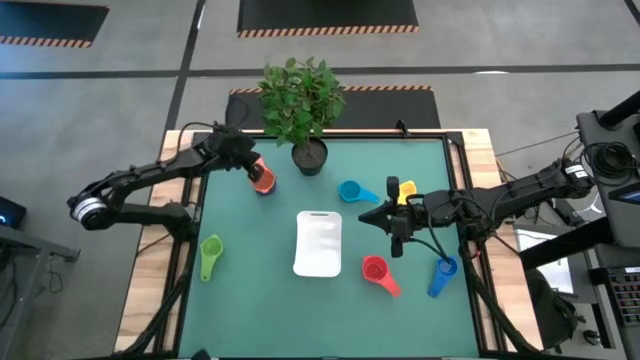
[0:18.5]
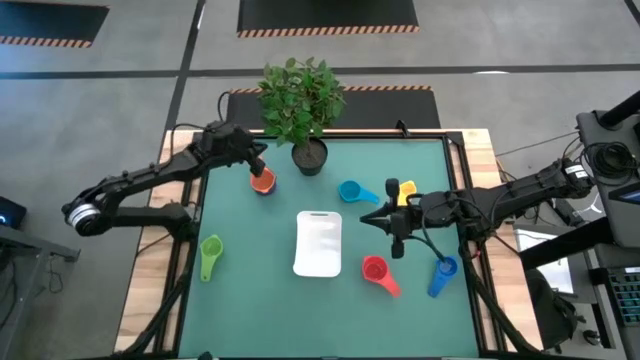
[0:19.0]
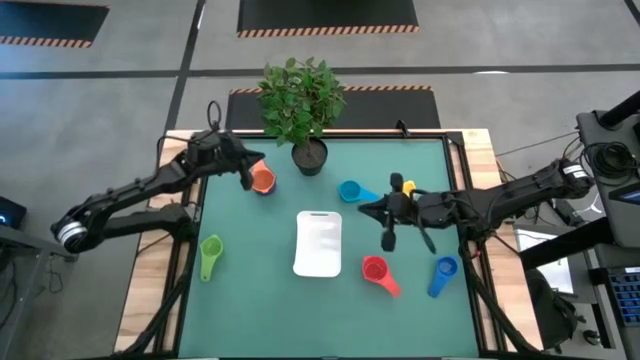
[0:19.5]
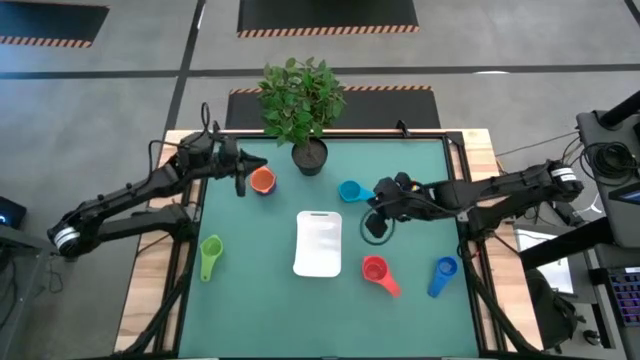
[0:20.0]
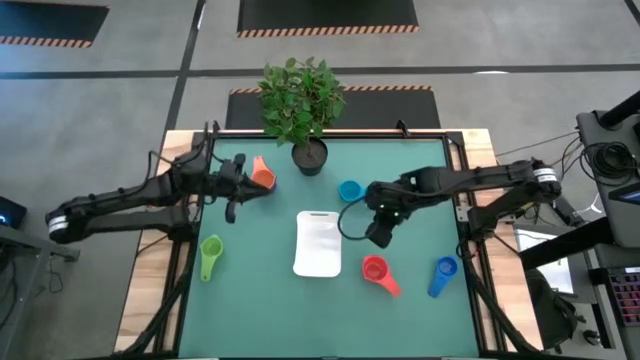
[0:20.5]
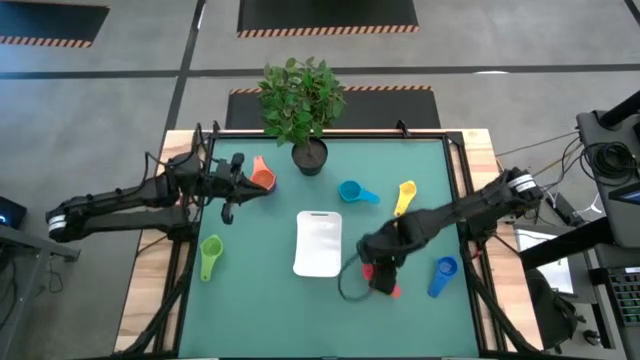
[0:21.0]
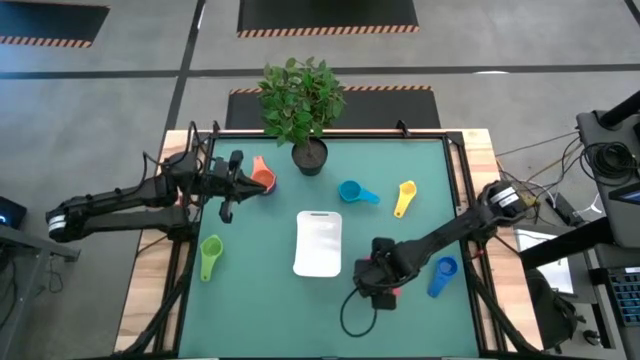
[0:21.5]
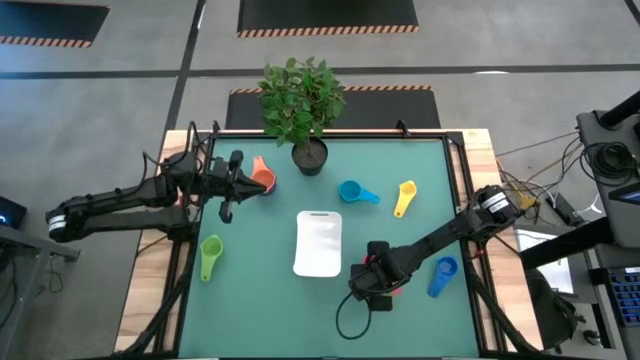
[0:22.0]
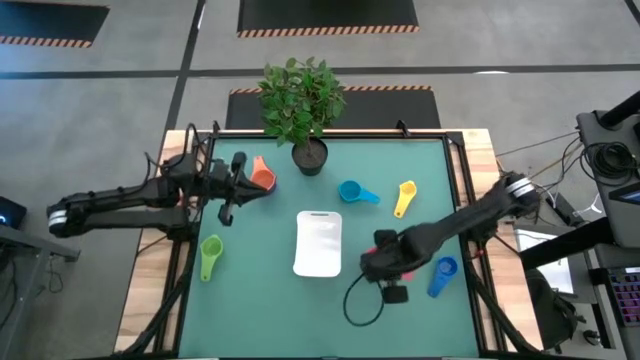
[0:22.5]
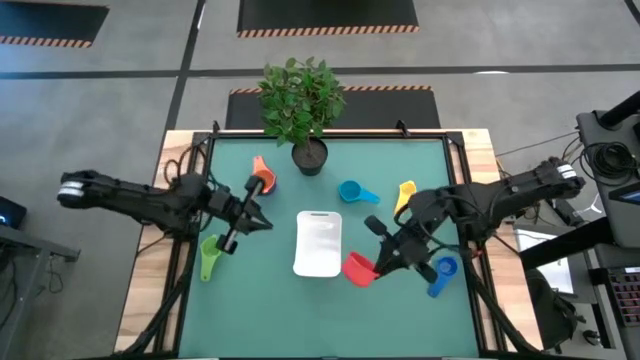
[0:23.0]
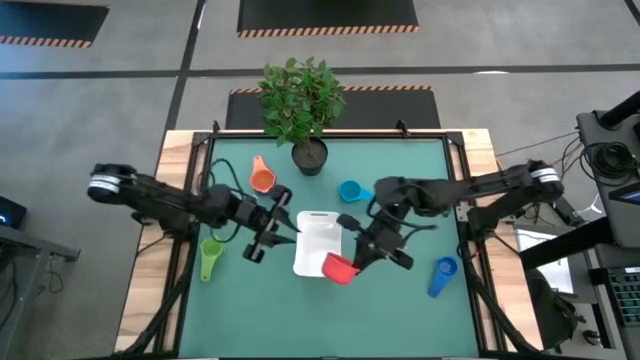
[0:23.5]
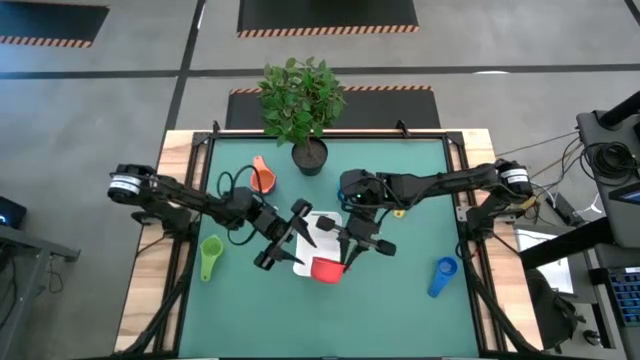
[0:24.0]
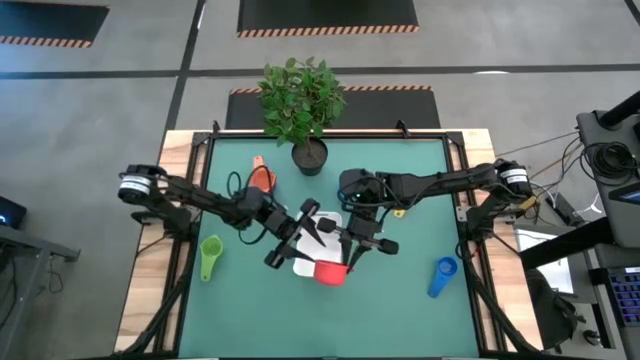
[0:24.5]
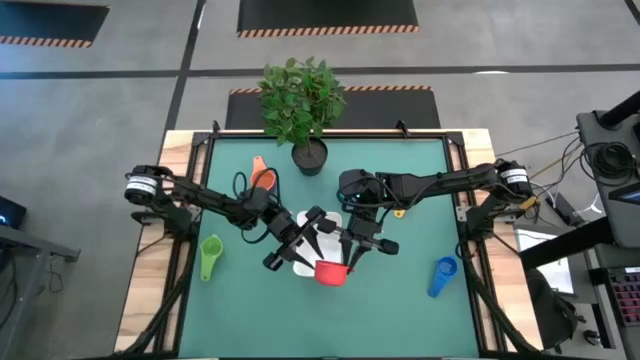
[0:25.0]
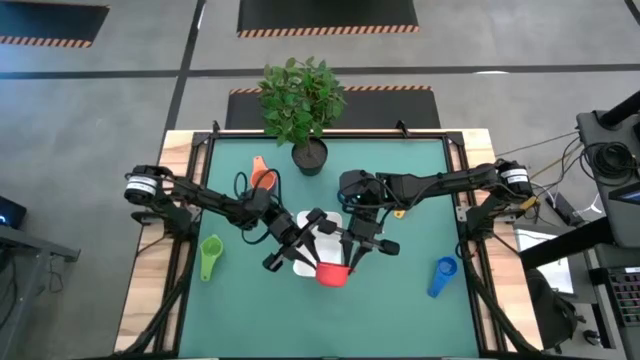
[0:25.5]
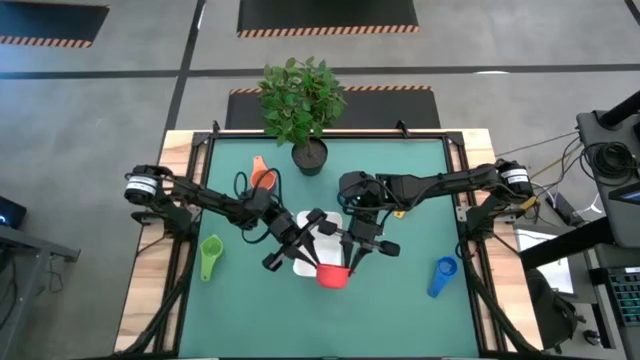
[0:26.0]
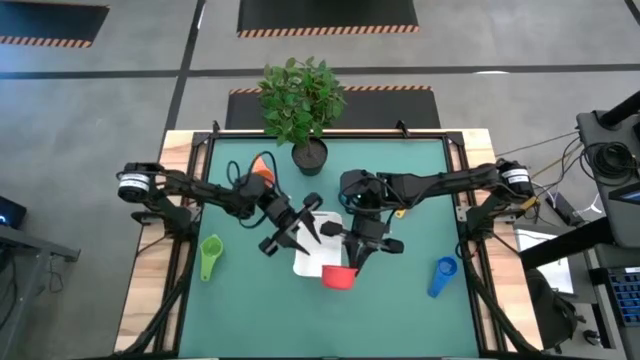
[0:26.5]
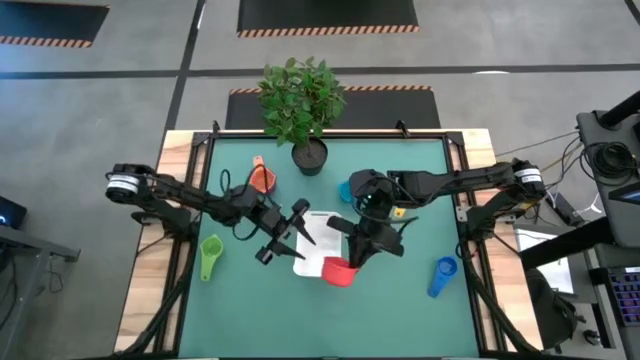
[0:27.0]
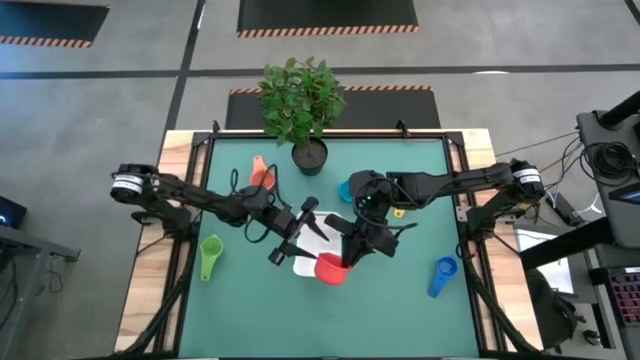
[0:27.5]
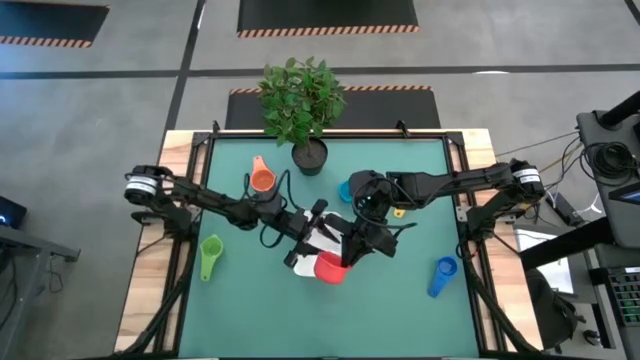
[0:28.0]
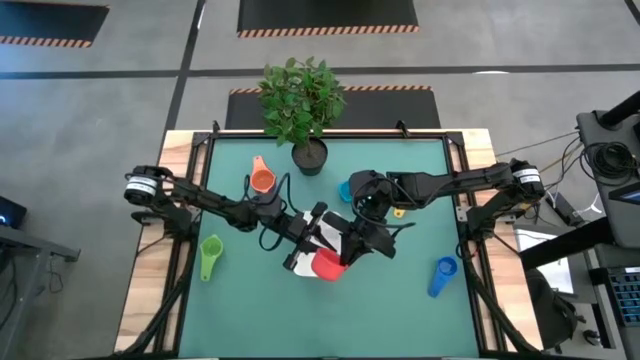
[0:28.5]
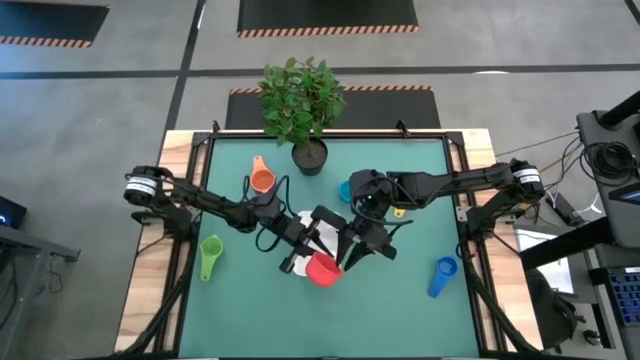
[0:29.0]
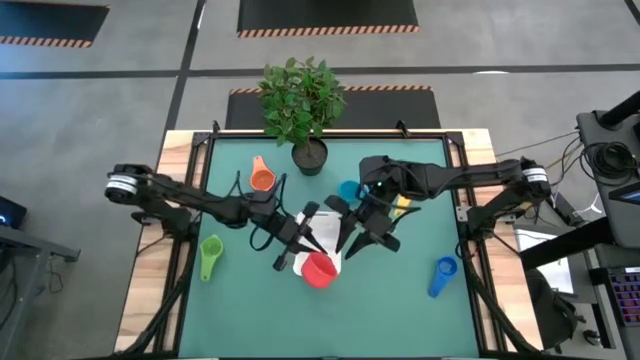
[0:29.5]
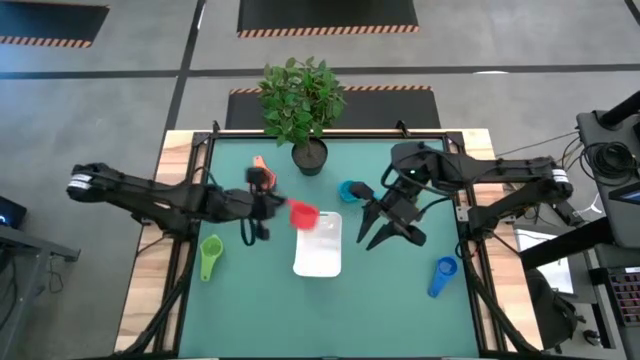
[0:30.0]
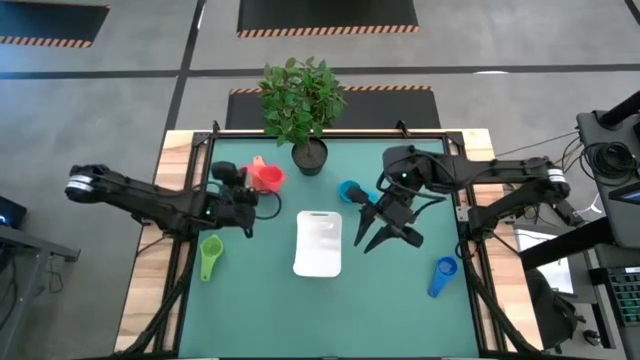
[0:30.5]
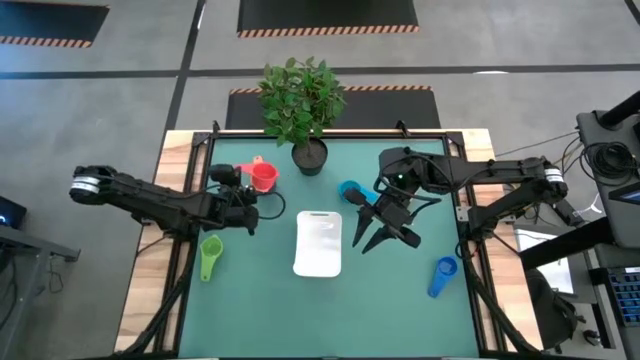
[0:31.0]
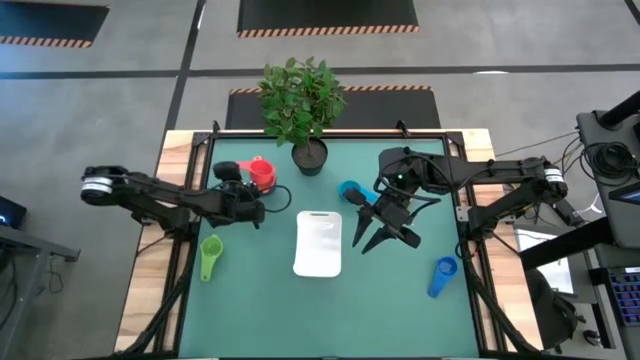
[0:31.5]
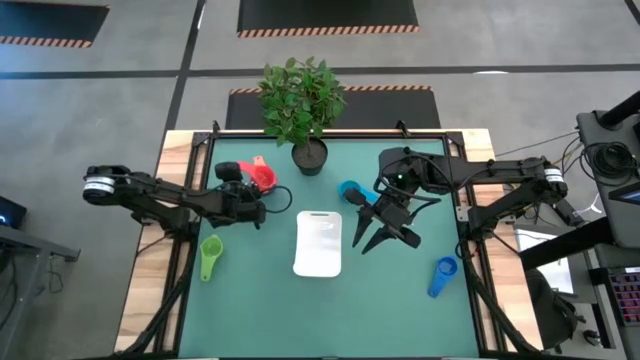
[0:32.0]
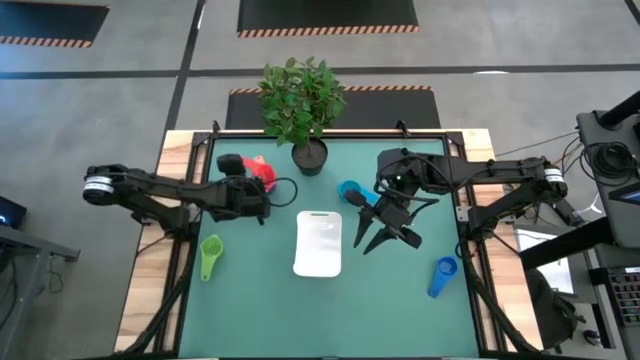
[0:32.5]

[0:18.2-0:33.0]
Task: Nest measuring cups in basket
Stack the red measuring cup on top of the orange measuring cup

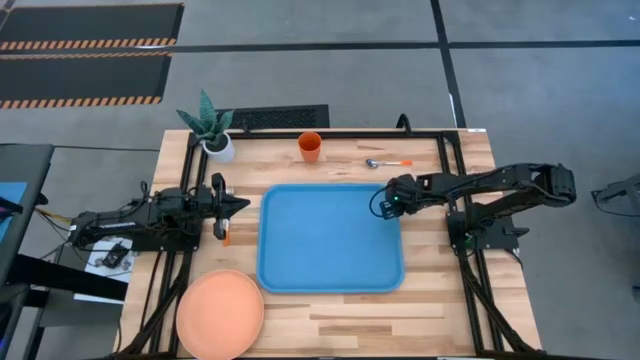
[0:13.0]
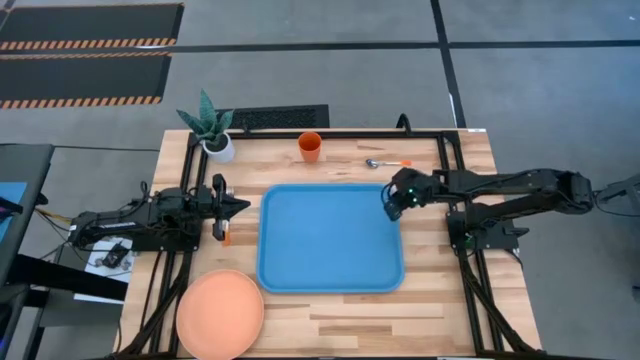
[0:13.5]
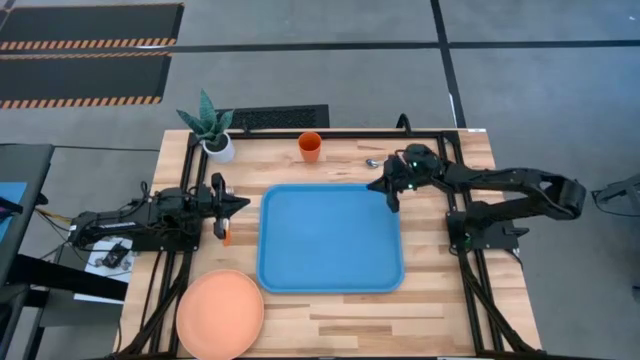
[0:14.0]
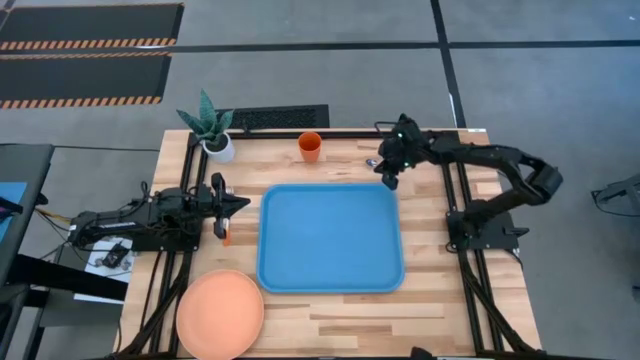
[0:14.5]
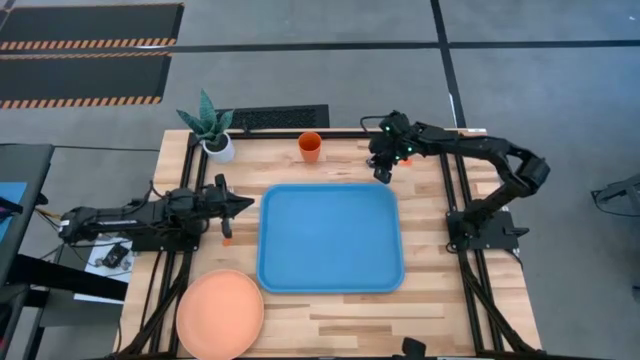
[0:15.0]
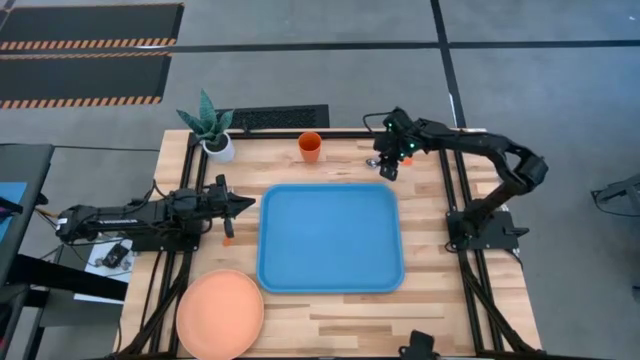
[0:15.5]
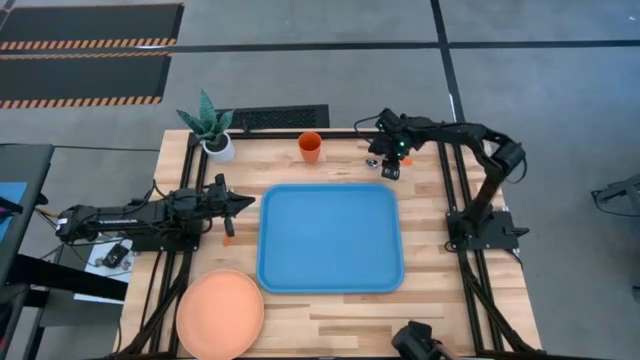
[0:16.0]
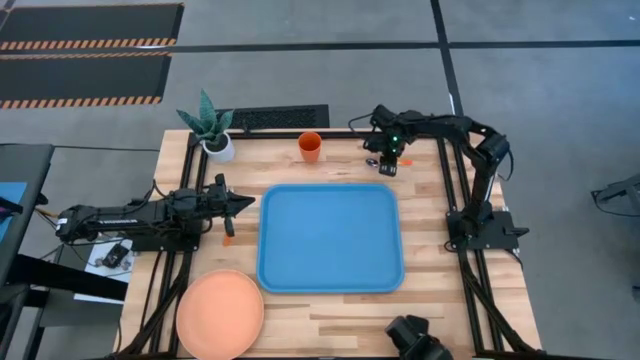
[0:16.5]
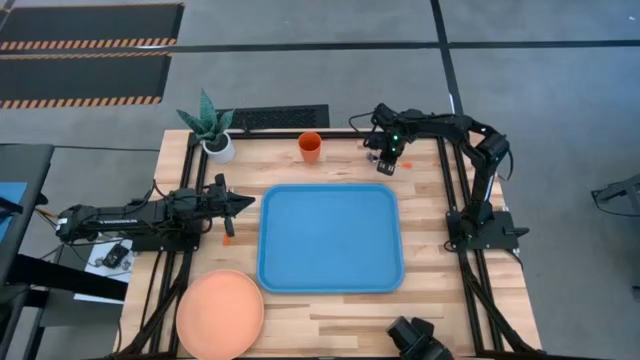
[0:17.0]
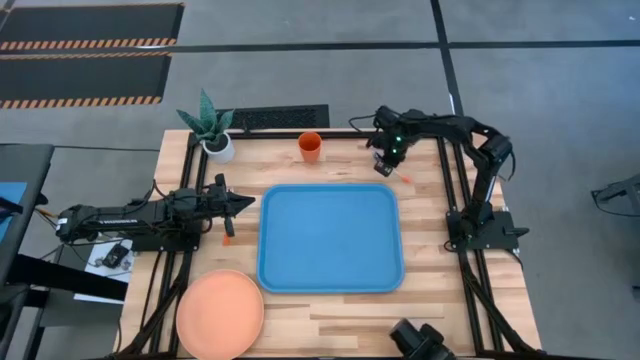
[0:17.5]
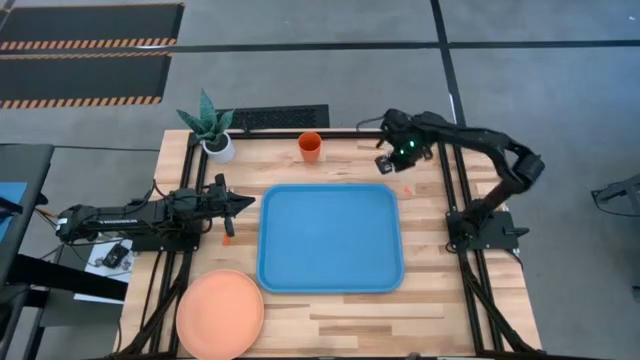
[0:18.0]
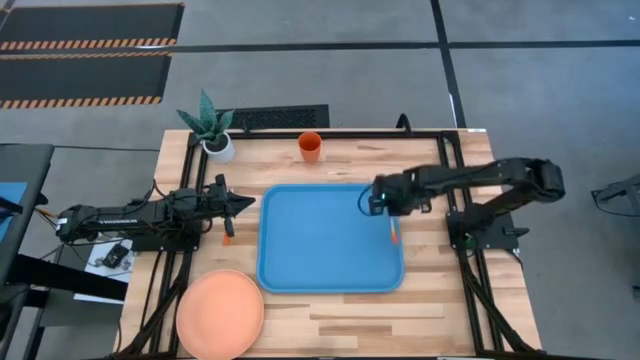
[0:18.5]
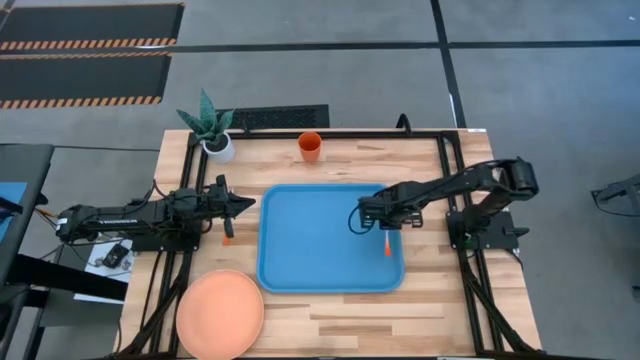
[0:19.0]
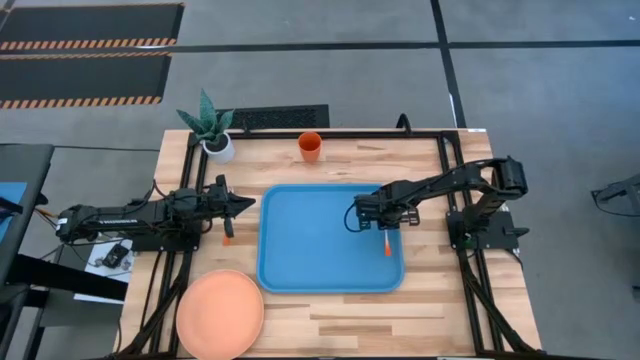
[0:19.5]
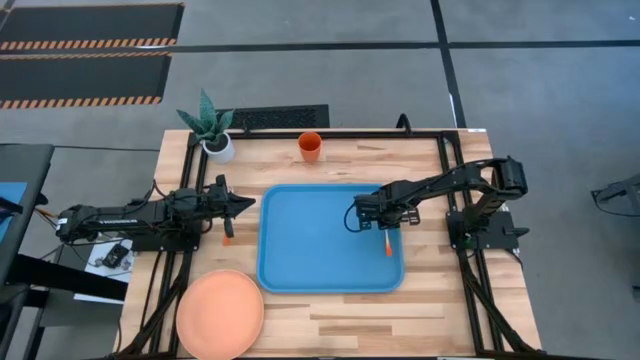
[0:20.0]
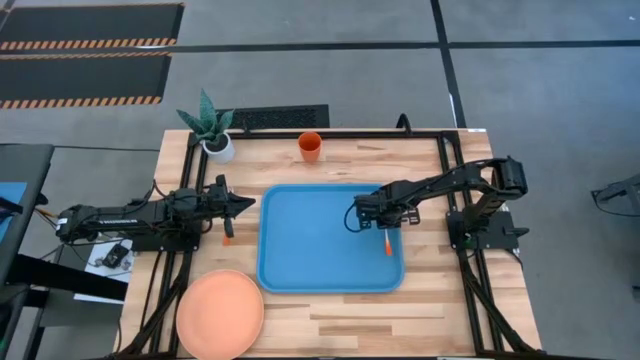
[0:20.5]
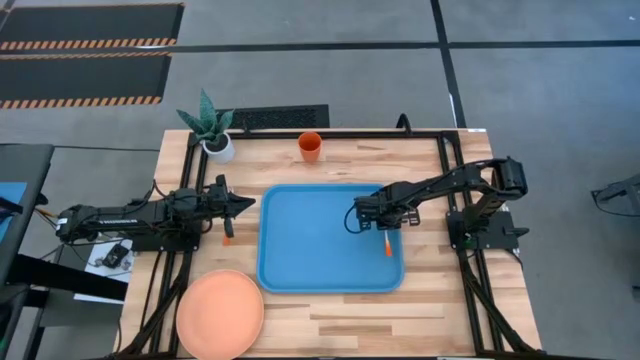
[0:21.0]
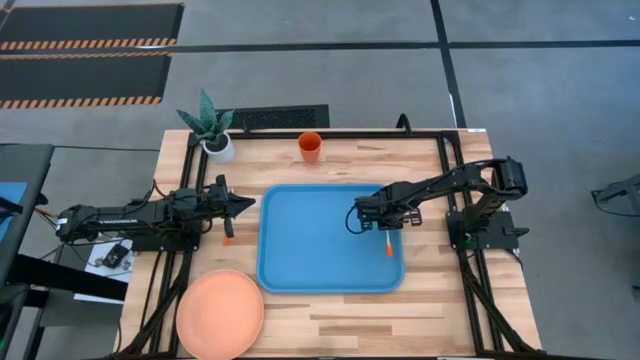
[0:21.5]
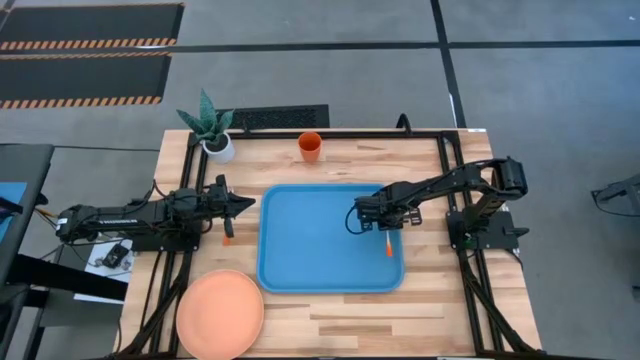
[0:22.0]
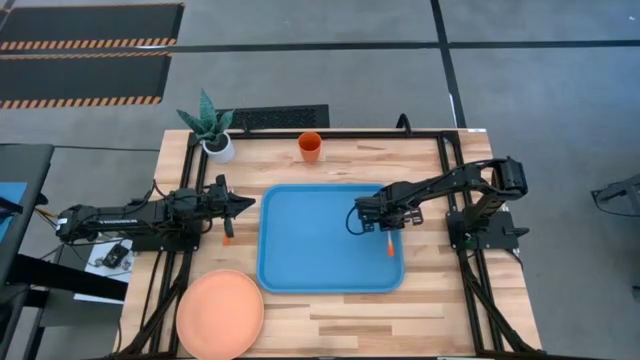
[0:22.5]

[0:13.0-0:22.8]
Task: Pick and place plate/cup/fork/spoon on tray
Put the orange spoon on the right of the blue tray
